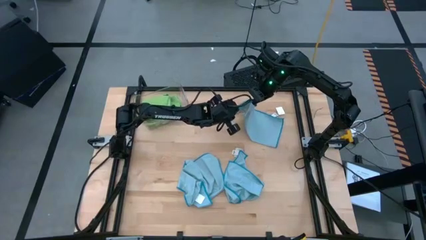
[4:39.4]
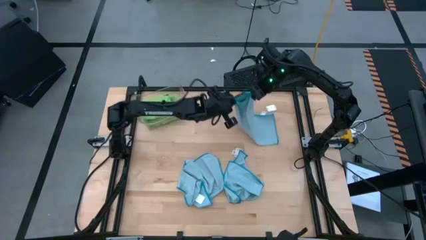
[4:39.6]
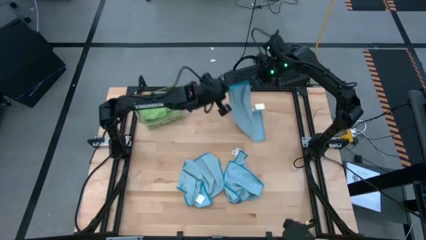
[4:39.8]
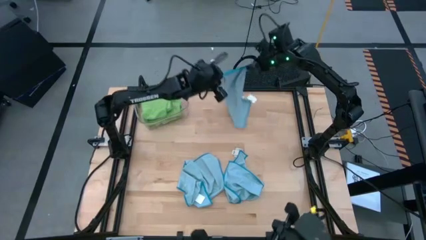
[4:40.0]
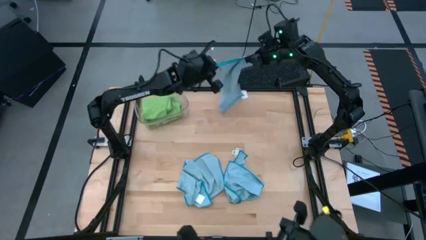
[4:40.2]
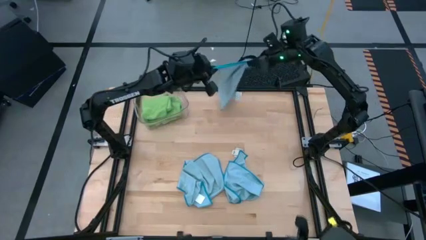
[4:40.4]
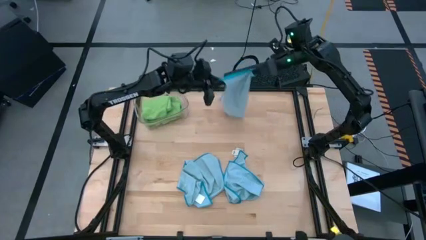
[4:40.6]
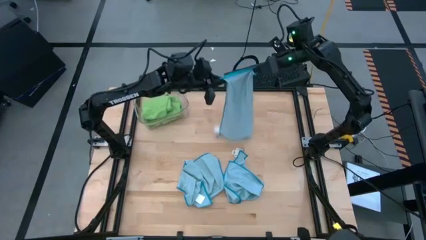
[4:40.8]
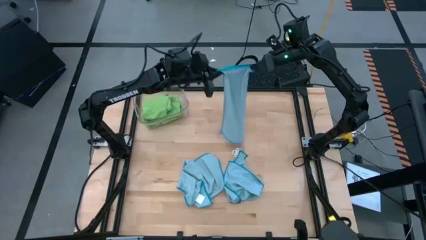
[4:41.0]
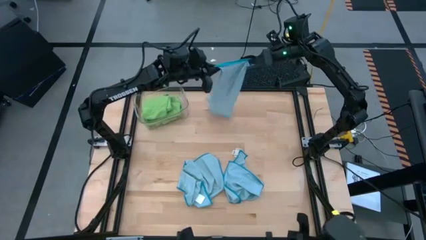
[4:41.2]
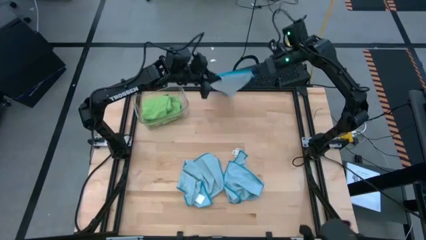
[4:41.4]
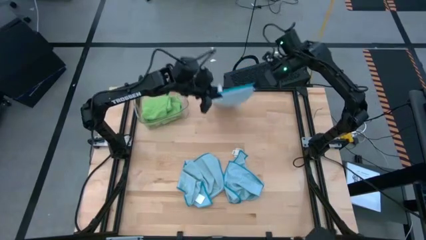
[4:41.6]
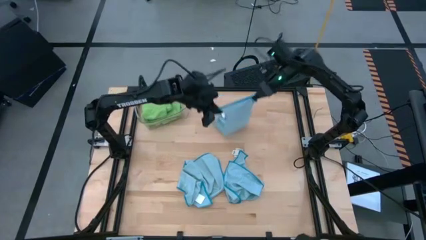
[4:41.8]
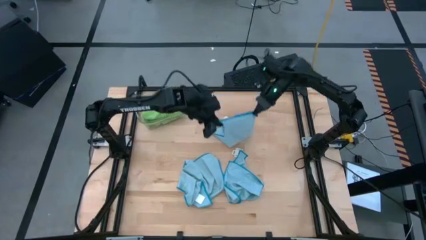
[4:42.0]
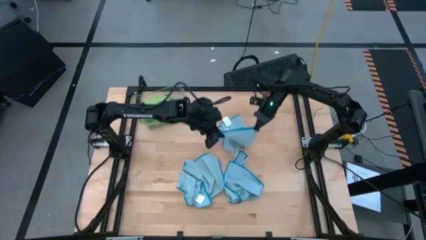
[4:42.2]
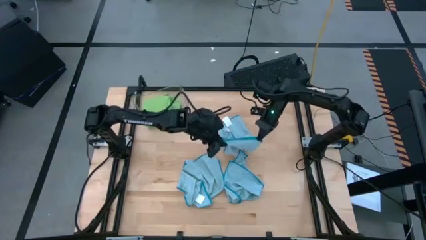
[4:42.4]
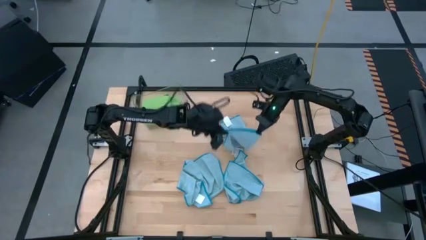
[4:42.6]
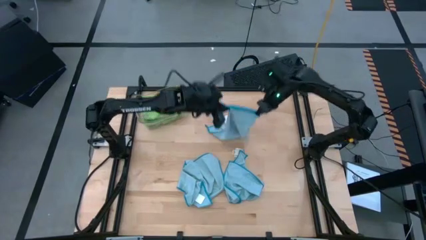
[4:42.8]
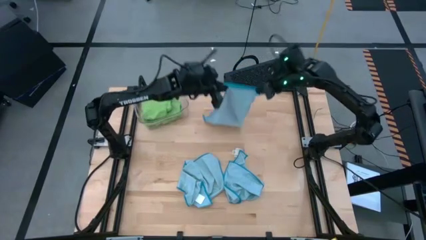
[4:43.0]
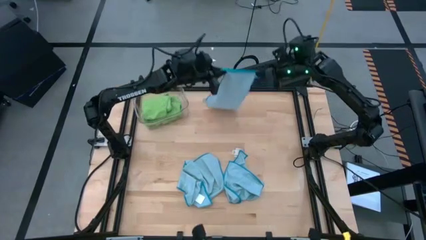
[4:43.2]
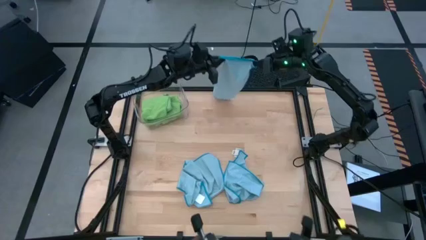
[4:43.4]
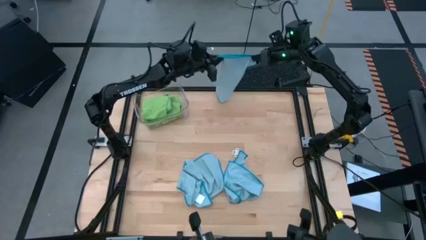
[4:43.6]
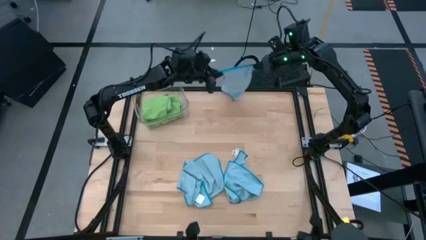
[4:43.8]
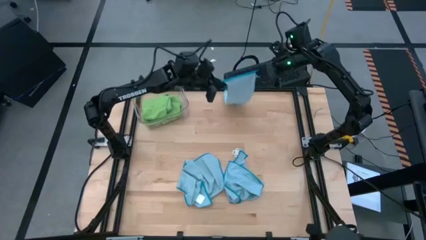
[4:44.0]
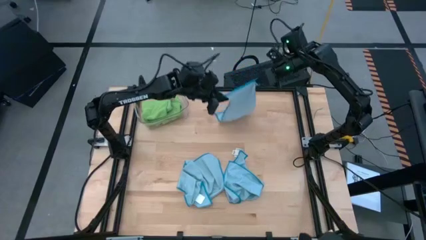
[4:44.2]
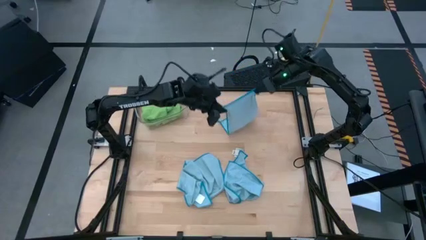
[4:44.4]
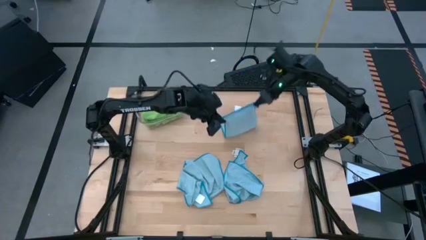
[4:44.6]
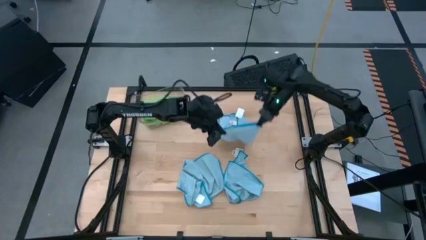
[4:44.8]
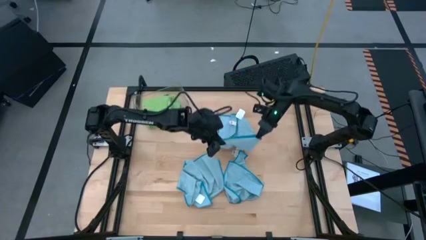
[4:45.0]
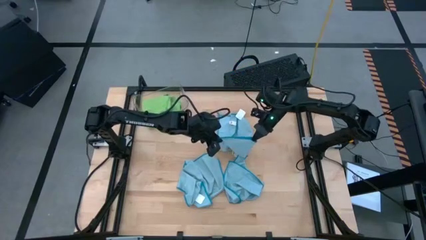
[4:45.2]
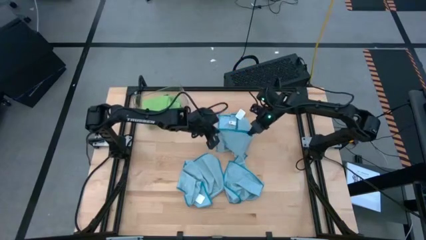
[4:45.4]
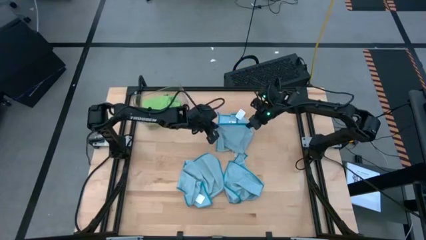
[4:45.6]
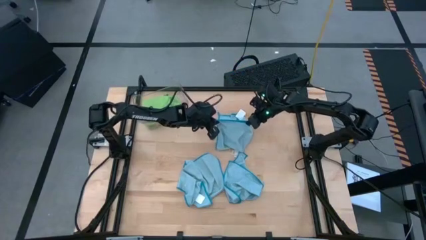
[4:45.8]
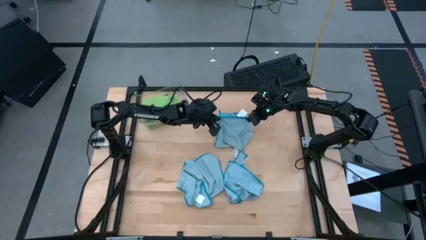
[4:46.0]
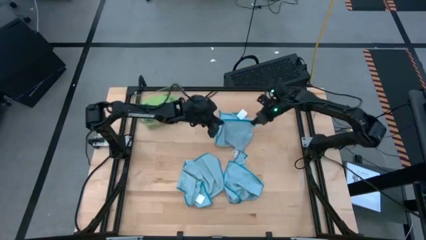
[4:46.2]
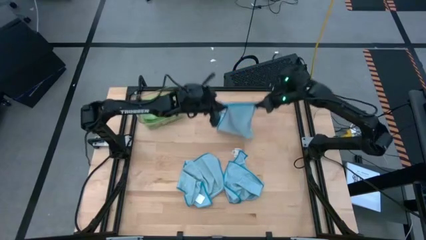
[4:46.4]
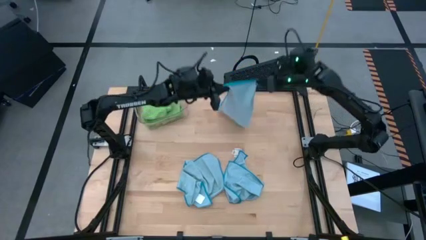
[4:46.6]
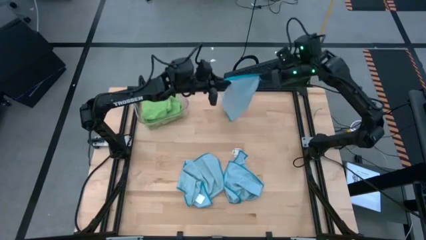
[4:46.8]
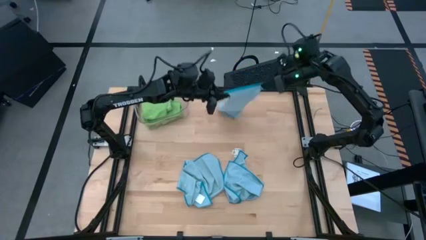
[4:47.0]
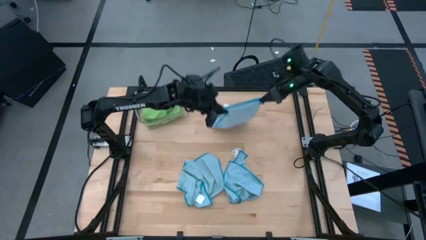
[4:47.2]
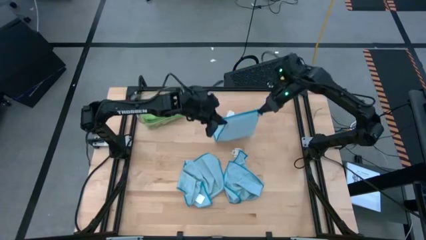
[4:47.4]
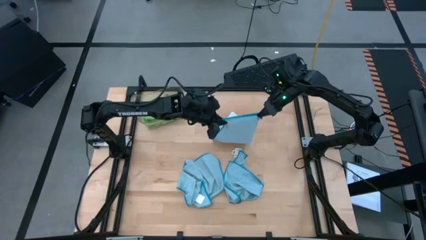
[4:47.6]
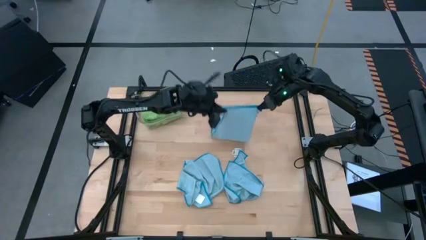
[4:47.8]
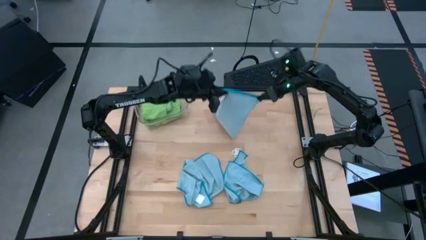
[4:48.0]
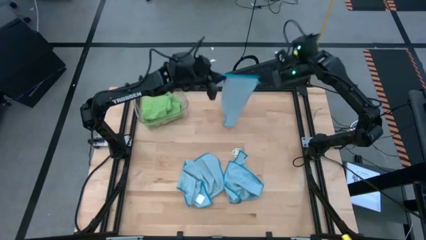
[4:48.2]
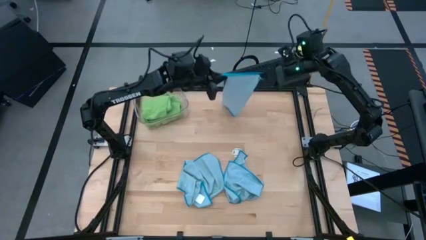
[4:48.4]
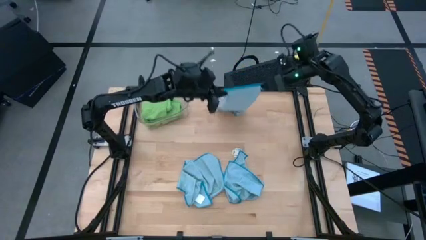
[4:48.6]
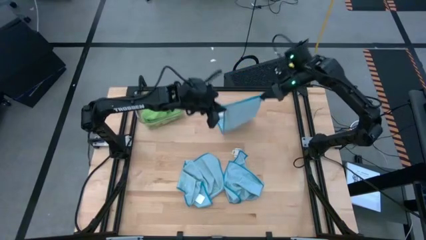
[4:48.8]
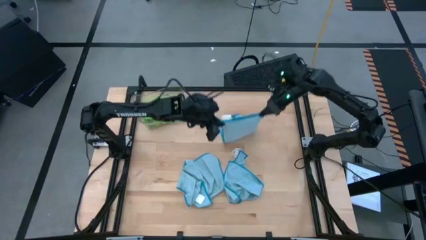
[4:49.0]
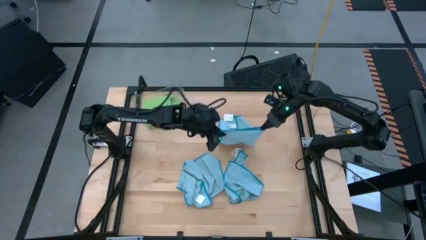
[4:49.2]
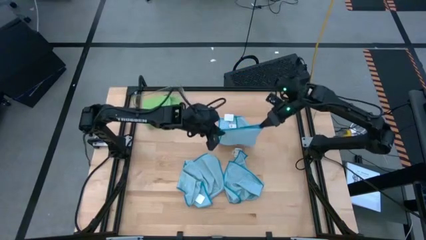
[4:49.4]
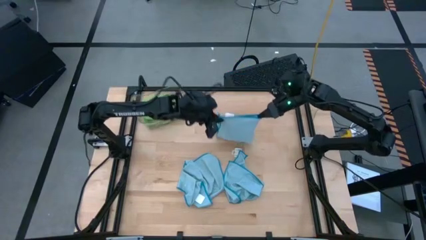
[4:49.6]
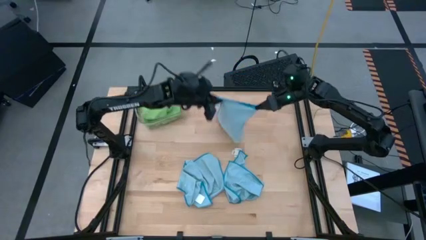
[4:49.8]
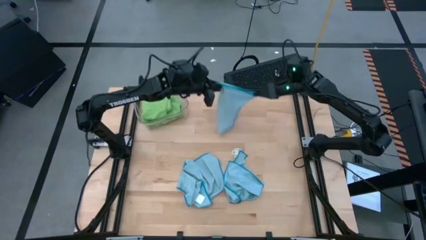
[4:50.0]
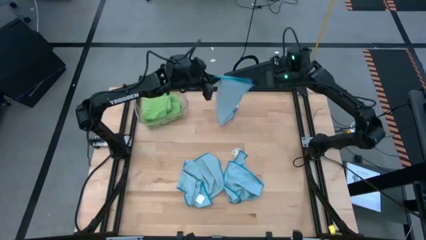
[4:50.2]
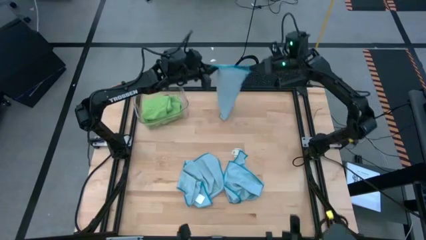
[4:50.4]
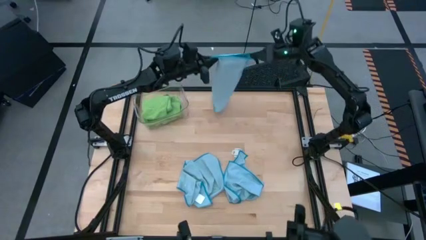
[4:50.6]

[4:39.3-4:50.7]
Task: Fold microfiber towels
Fold the top center blue microfiber cloth

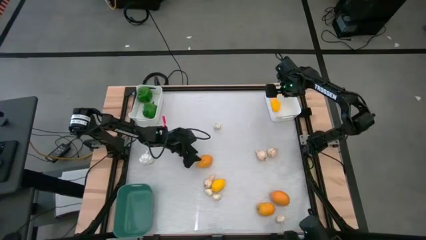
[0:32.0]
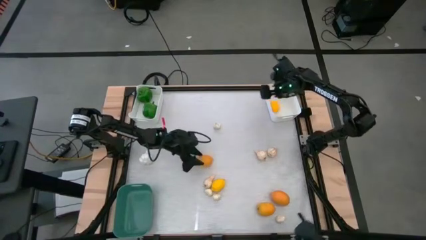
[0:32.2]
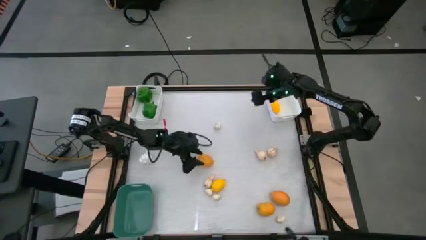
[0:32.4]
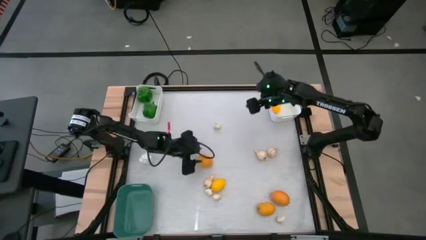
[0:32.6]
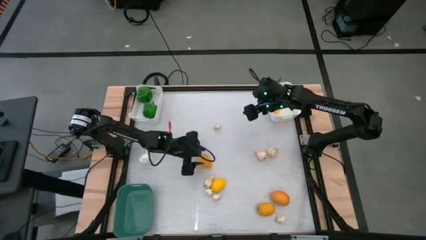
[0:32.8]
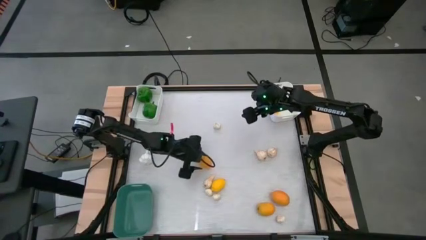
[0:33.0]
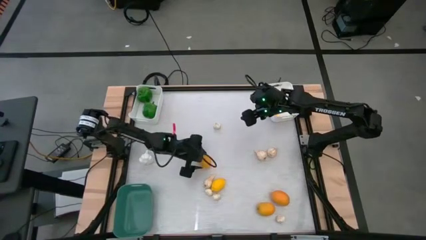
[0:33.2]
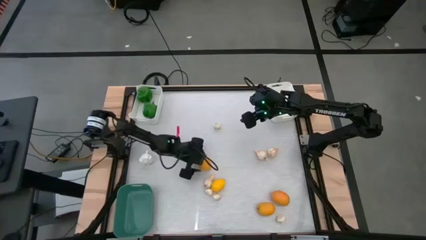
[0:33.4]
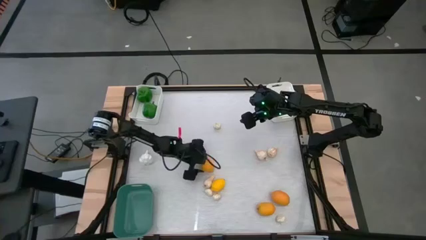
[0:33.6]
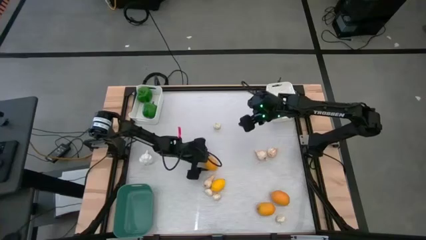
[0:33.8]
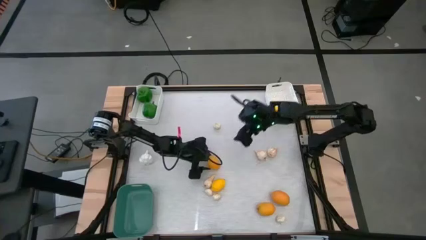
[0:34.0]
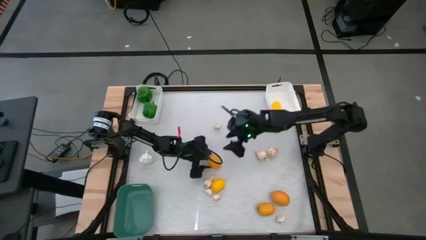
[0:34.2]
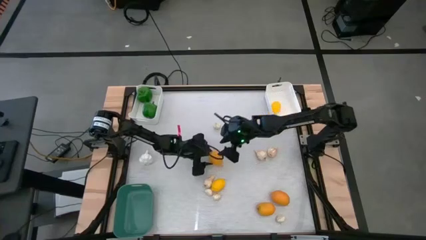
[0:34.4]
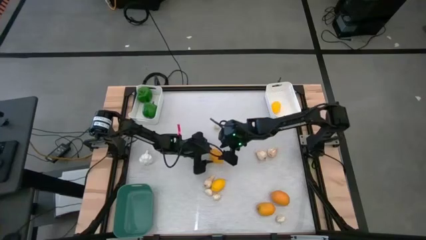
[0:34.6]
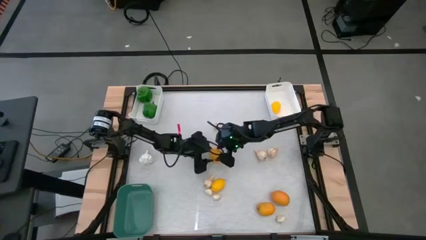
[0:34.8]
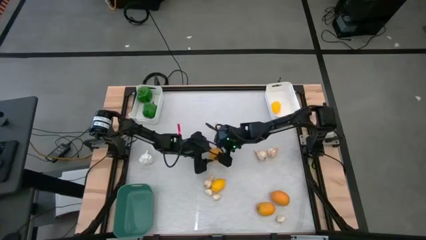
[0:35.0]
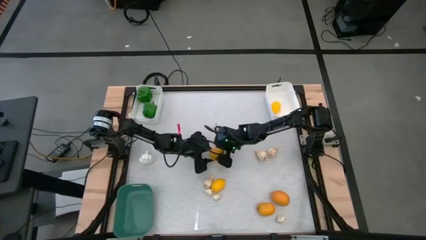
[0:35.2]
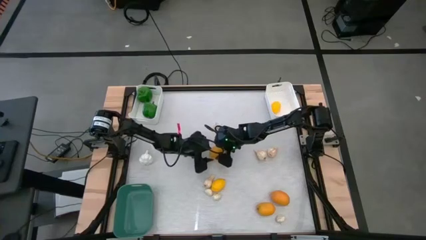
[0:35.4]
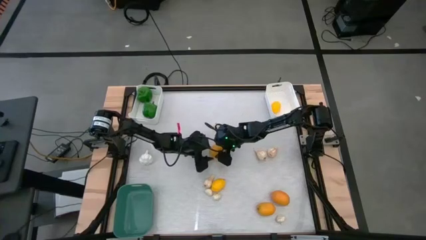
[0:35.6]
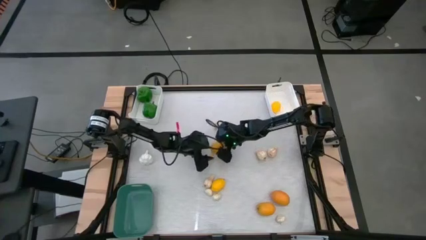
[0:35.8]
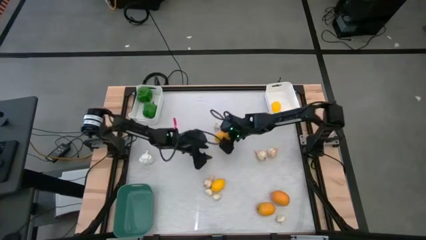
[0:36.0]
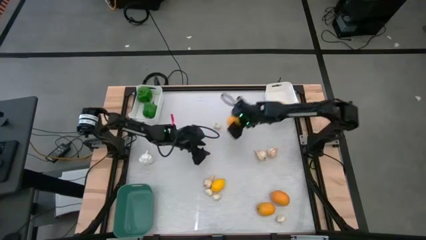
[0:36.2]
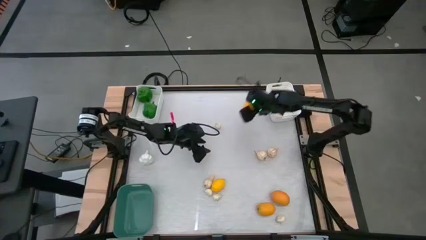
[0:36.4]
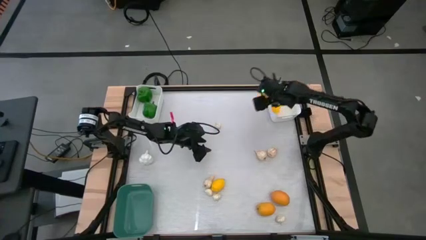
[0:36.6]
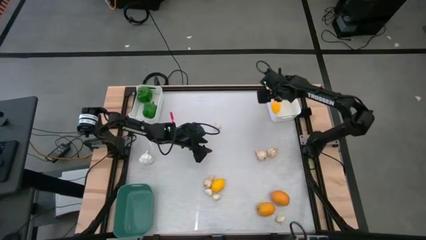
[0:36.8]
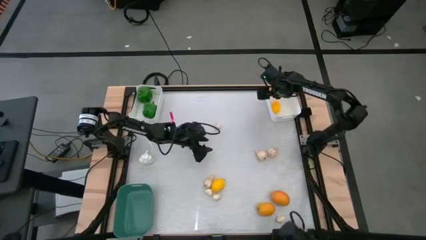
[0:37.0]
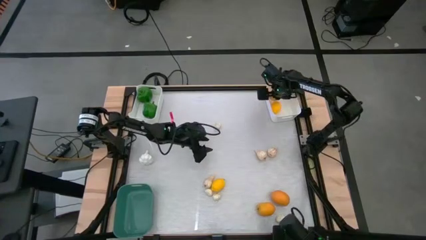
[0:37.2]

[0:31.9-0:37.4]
Task: Sort produce into baskets
Put the yellow lemon into the right white bin
